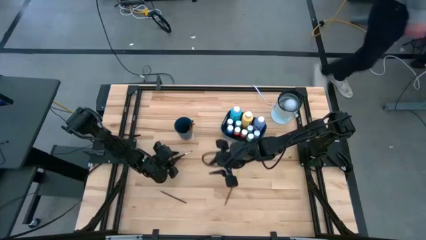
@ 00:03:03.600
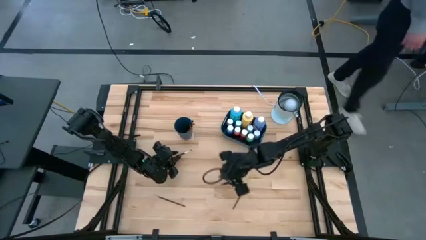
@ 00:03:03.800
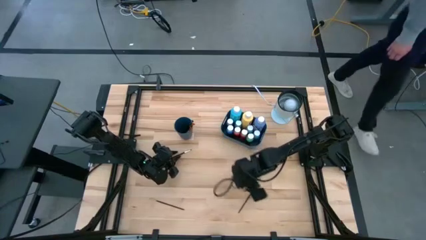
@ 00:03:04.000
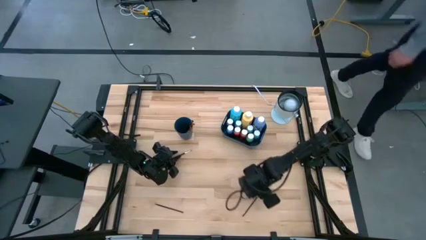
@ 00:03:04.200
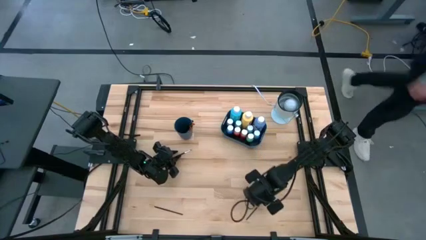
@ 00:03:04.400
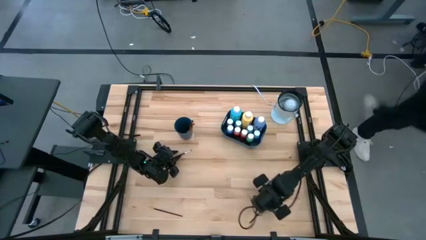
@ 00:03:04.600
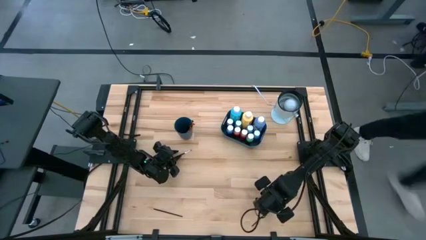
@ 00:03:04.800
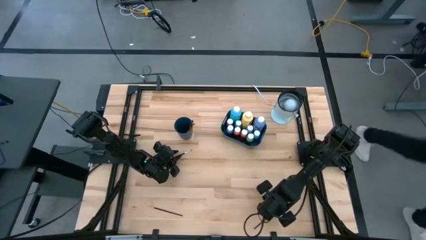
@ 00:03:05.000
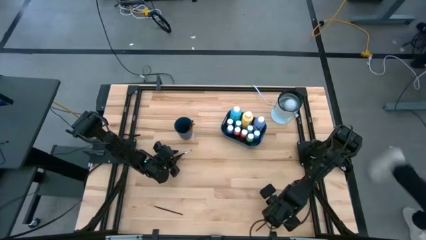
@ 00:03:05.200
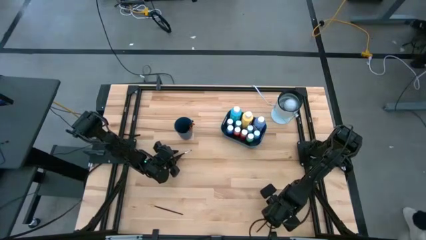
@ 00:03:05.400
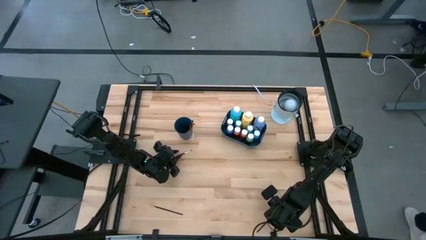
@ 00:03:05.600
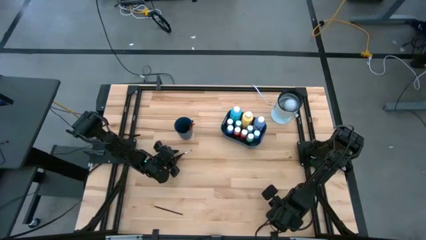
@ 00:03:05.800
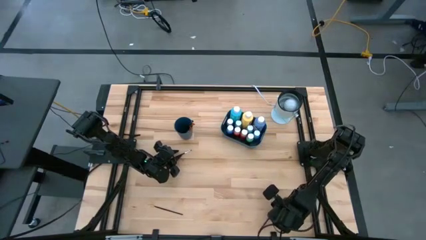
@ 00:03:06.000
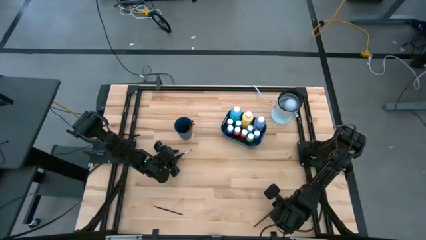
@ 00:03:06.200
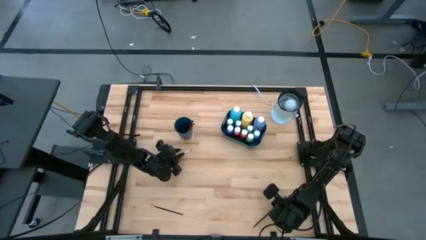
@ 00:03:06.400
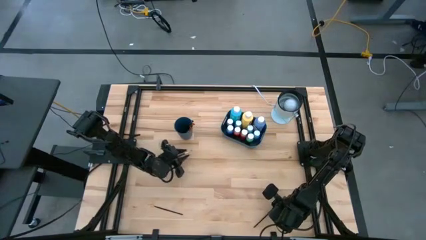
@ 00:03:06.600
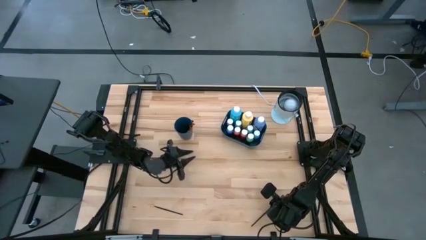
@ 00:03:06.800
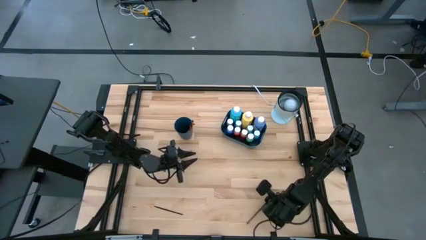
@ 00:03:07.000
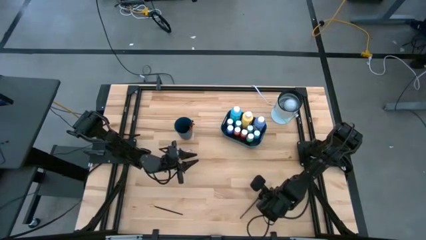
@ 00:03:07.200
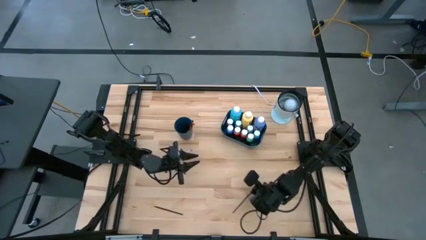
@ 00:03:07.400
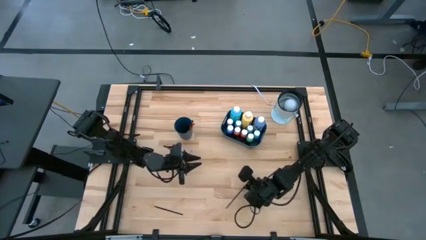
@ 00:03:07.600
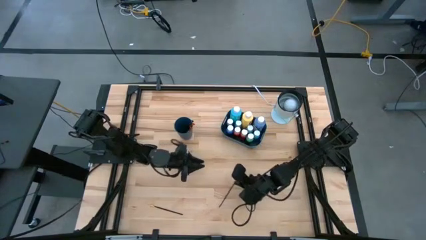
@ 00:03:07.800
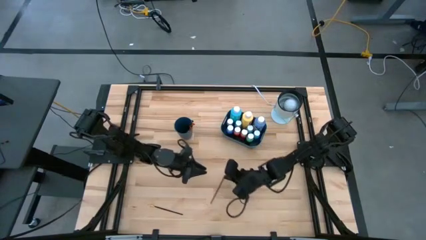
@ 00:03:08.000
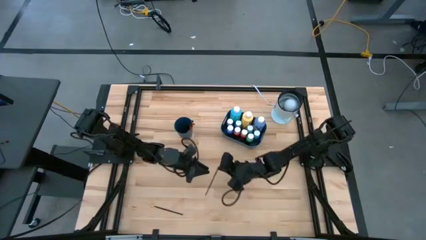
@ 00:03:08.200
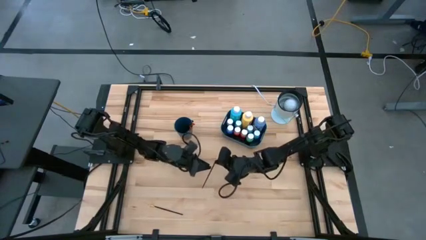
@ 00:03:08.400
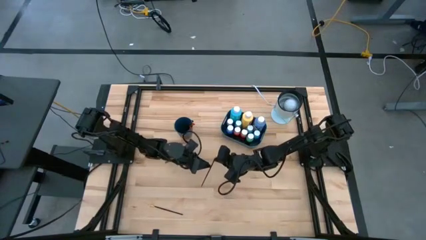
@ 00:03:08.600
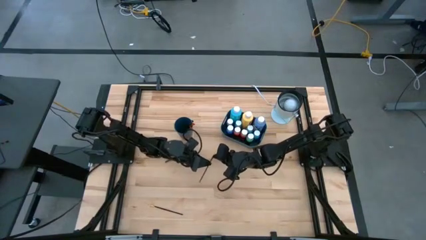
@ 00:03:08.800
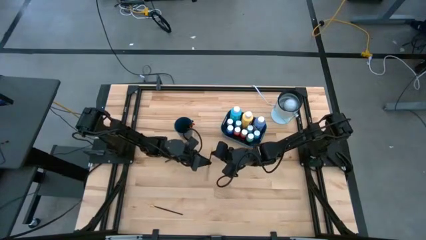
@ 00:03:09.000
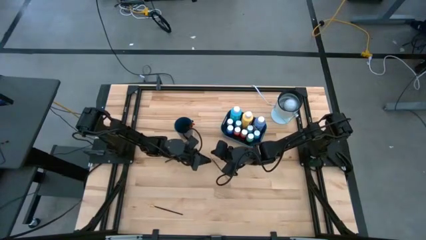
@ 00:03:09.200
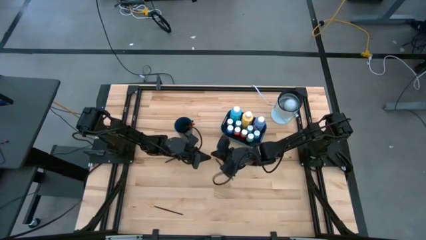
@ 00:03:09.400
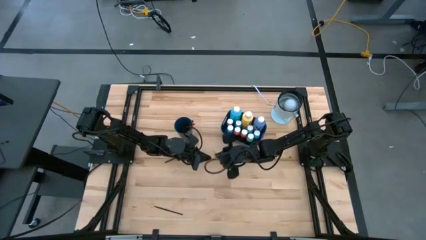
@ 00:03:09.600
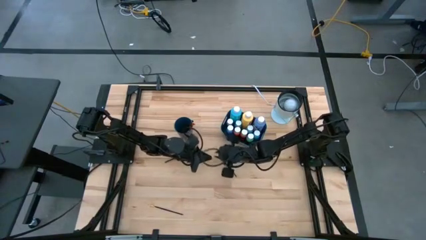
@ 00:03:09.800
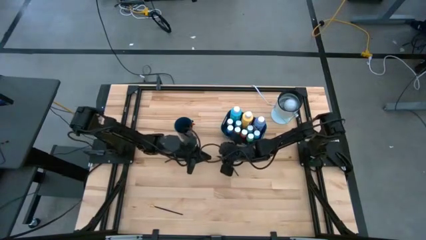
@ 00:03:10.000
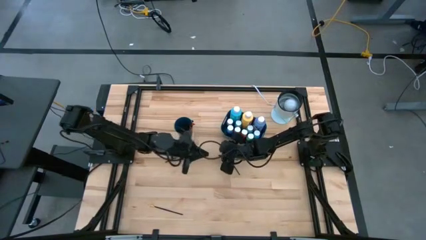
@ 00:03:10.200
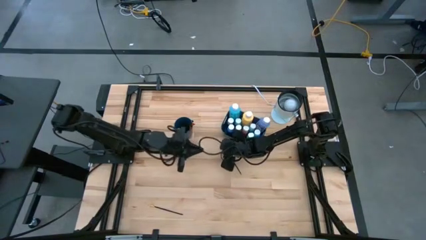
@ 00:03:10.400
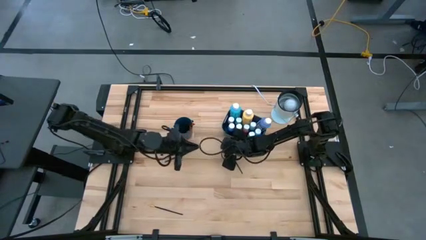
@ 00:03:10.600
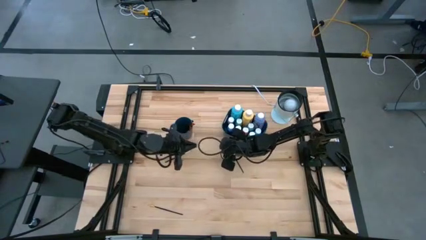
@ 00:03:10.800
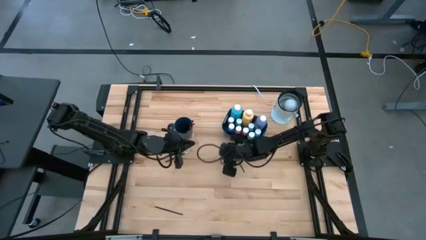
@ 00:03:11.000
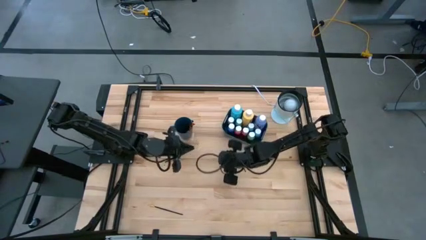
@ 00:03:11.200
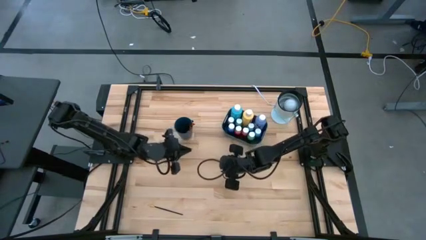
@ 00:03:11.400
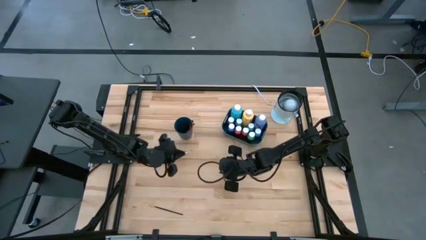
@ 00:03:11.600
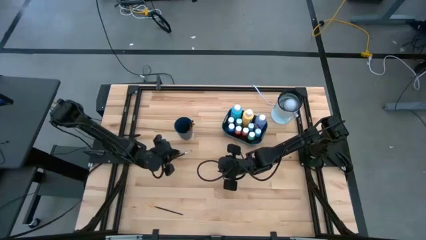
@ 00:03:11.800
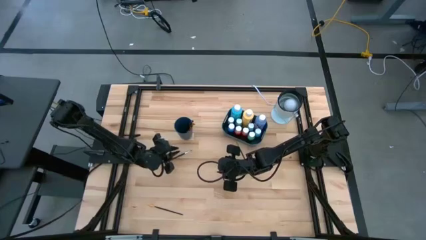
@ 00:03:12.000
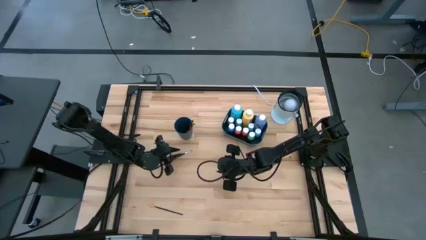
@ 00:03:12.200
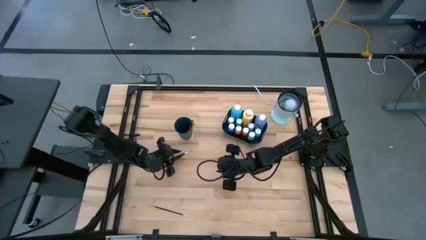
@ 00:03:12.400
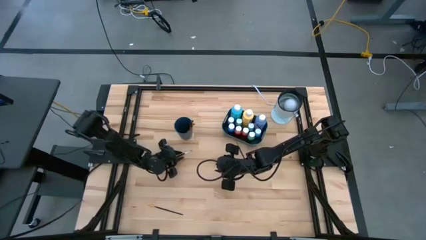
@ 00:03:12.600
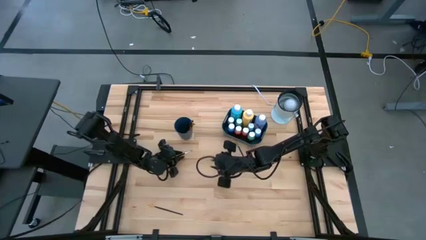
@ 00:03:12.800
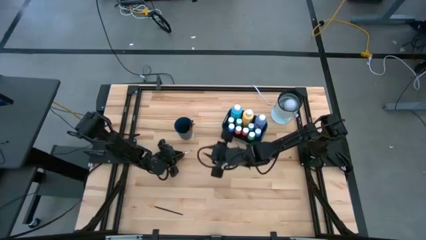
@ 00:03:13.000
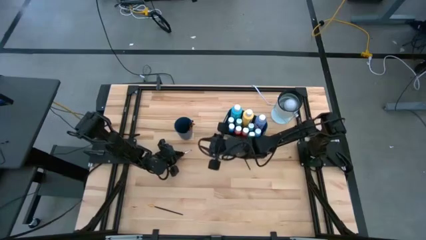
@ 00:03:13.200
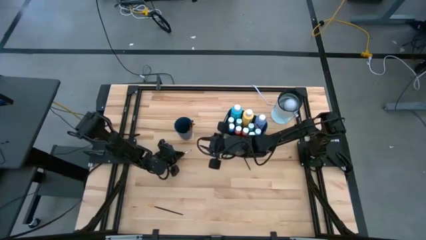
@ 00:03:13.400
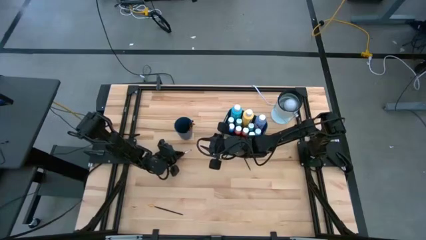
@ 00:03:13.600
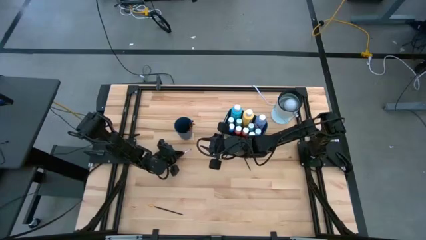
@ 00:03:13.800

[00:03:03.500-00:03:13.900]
Task: Pick & Place Paint Supplies
Put the silver paintbrush into the blue cup

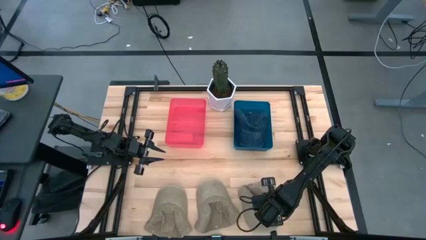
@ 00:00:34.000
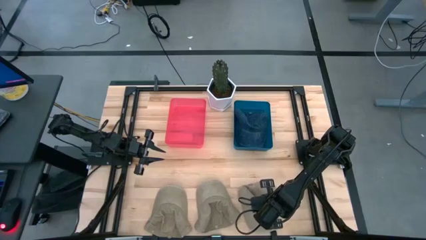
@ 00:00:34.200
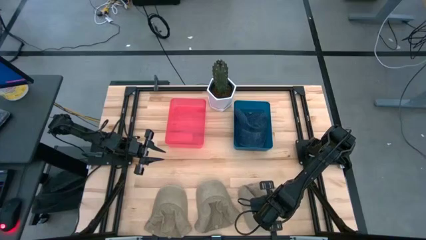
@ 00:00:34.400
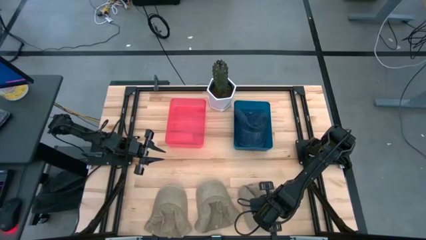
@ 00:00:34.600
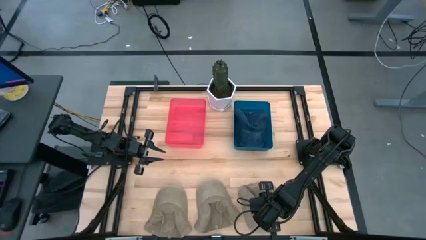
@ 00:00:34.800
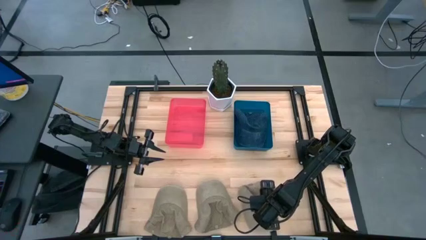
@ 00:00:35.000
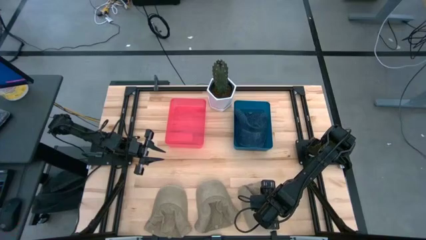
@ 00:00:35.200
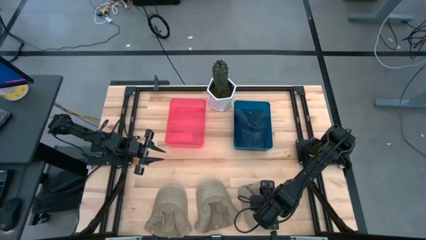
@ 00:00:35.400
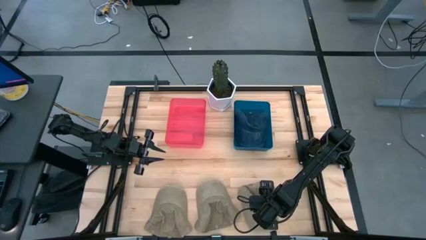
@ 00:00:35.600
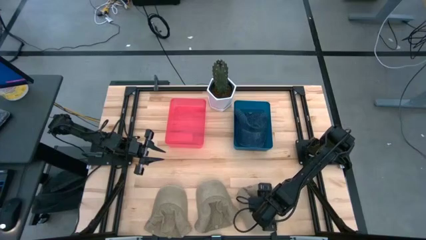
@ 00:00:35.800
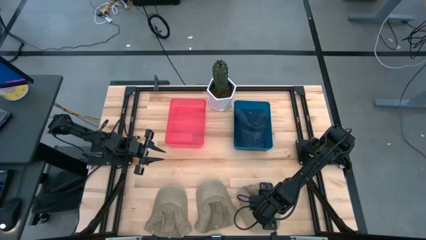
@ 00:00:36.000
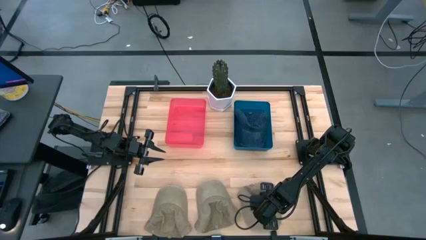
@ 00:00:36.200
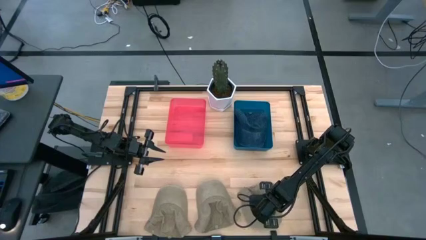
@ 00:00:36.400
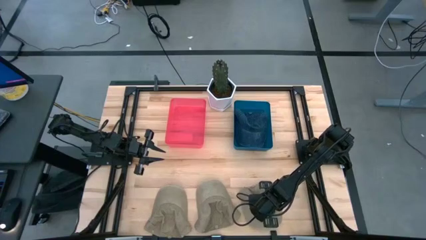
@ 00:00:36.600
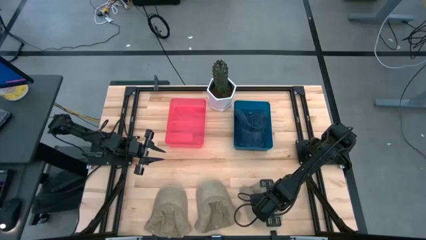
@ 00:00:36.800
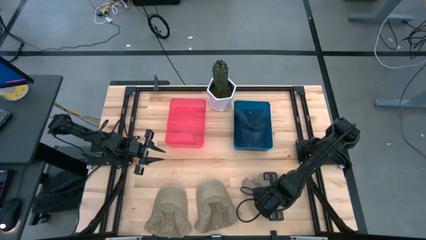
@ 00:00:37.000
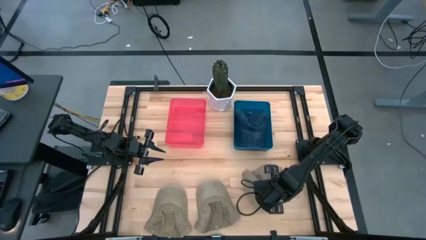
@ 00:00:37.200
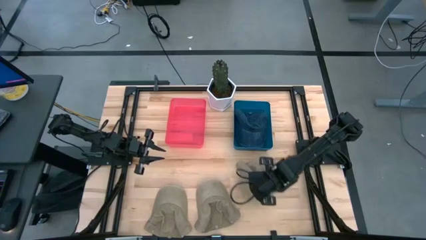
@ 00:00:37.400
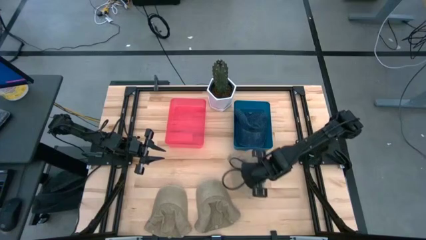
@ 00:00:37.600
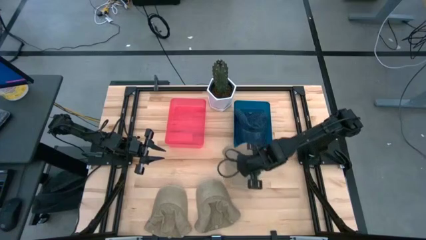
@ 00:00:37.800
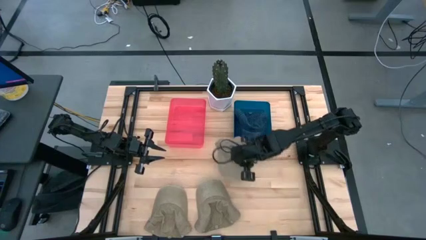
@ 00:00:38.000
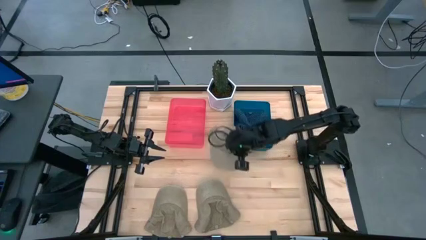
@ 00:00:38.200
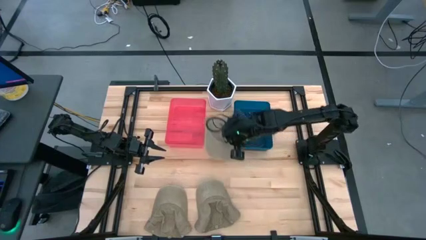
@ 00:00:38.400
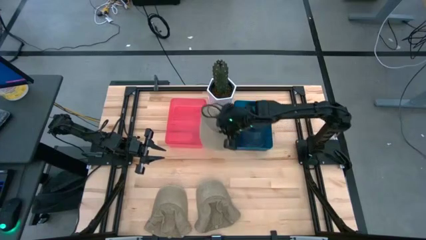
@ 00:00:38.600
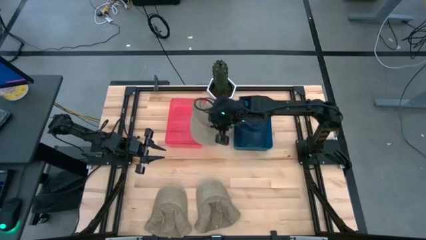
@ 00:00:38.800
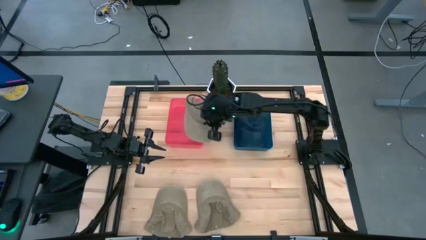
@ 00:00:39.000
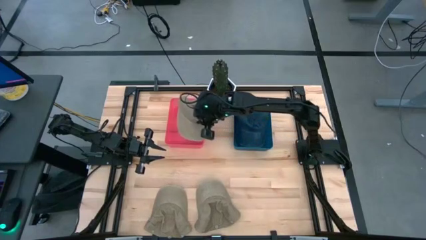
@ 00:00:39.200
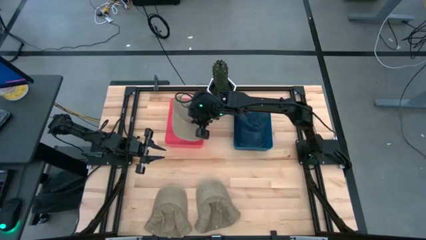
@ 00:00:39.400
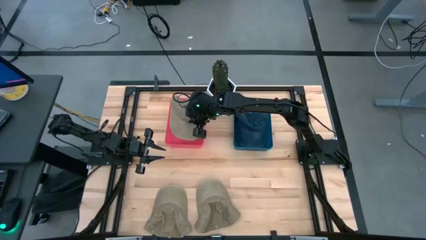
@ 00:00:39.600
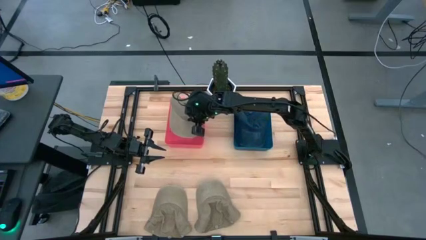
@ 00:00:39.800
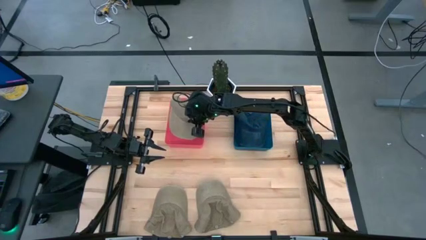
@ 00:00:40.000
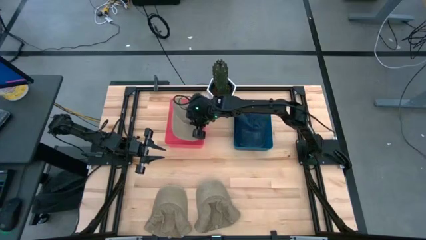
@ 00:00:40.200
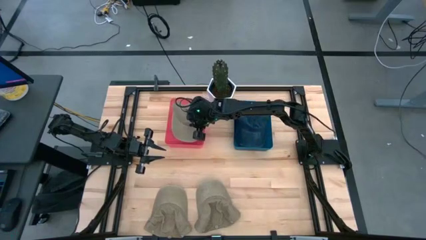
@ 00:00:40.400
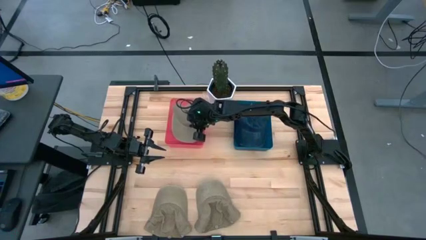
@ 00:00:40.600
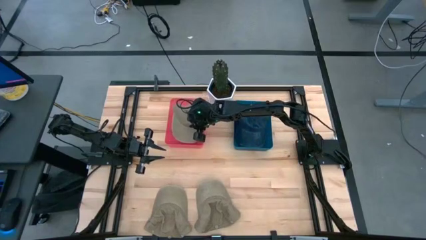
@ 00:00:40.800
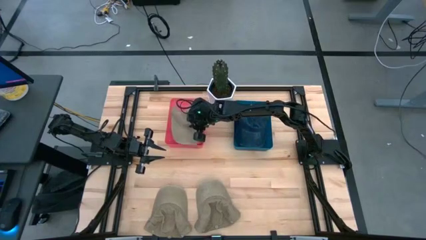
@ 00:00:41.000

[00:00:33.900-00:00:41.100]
Task: Pick & Place hat
Put the right brown cap into the red bin
